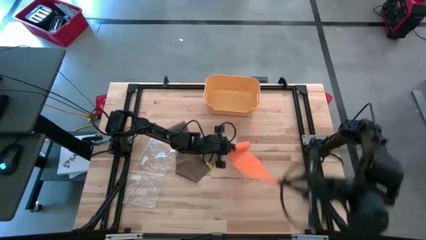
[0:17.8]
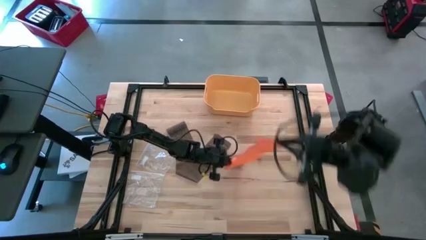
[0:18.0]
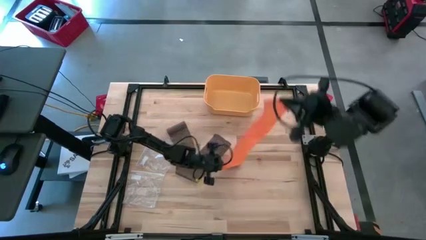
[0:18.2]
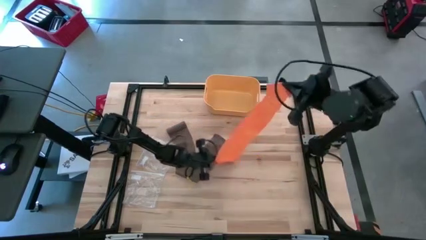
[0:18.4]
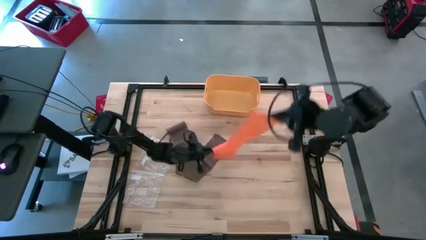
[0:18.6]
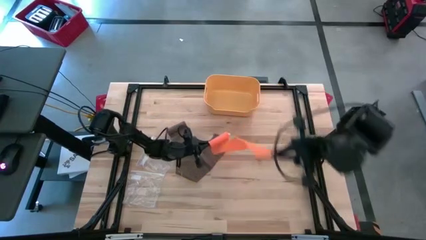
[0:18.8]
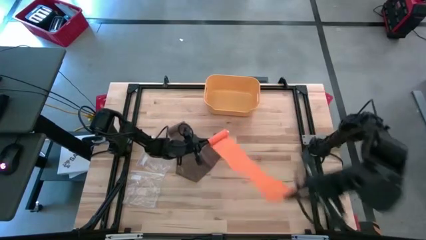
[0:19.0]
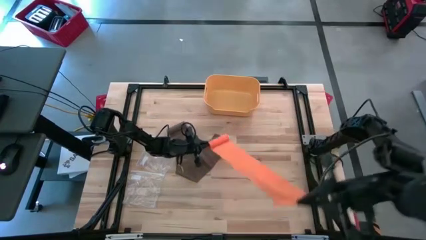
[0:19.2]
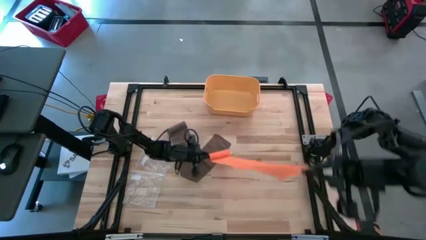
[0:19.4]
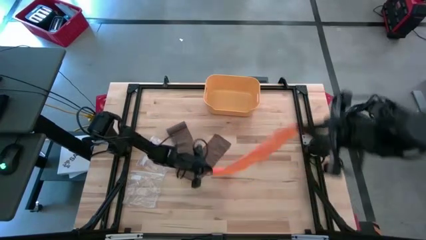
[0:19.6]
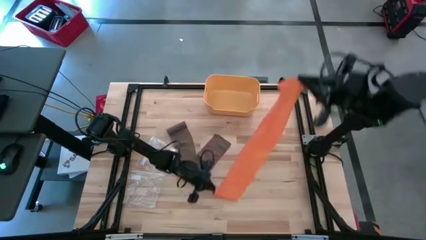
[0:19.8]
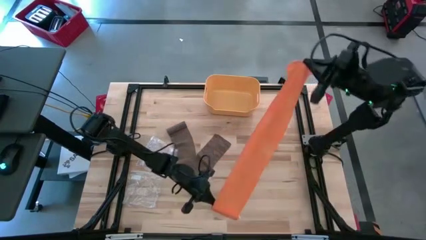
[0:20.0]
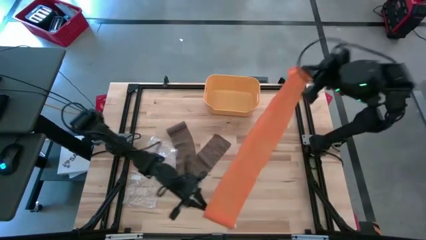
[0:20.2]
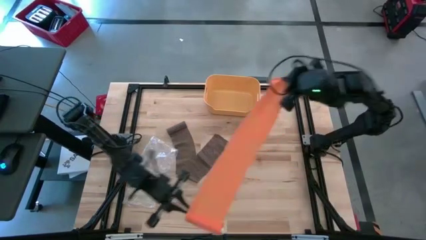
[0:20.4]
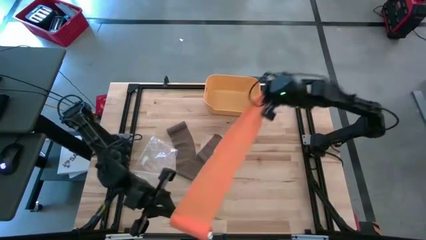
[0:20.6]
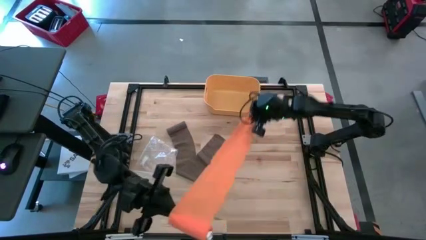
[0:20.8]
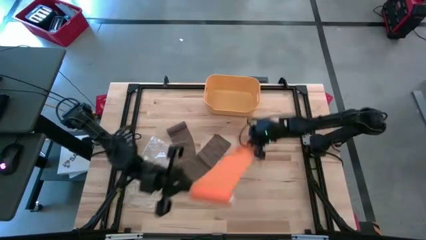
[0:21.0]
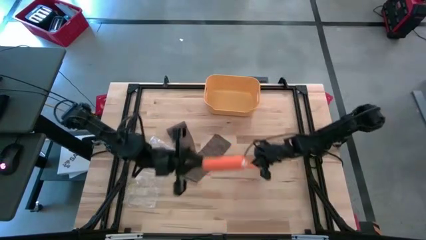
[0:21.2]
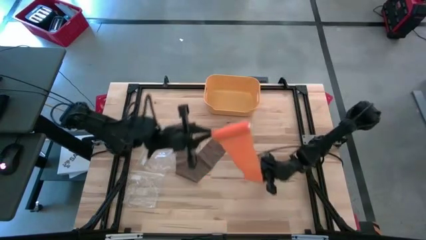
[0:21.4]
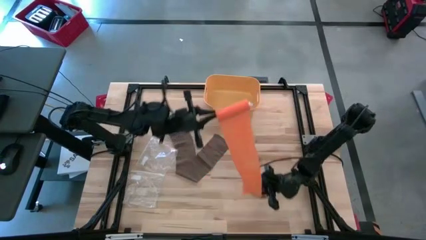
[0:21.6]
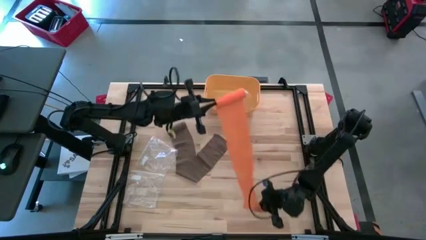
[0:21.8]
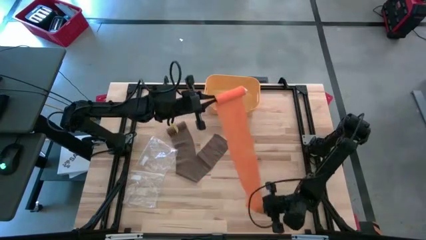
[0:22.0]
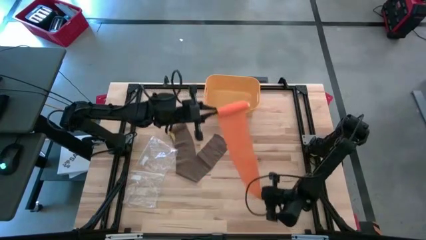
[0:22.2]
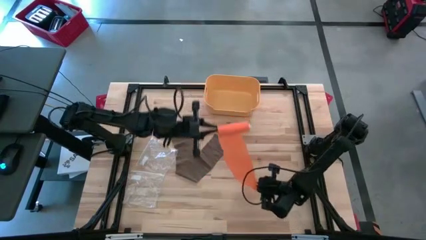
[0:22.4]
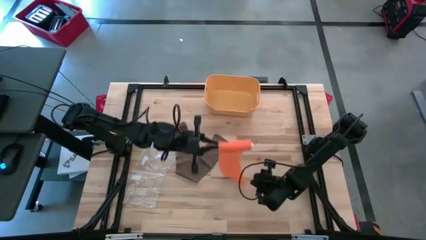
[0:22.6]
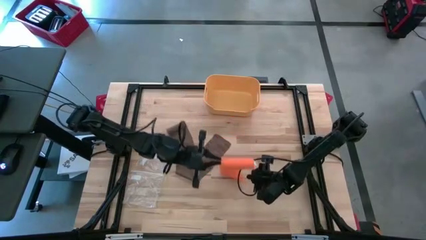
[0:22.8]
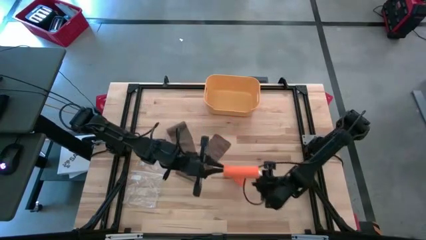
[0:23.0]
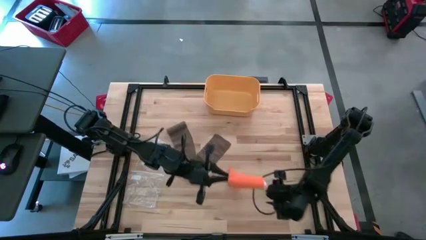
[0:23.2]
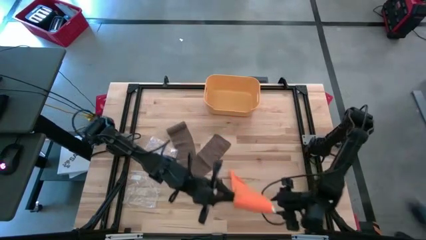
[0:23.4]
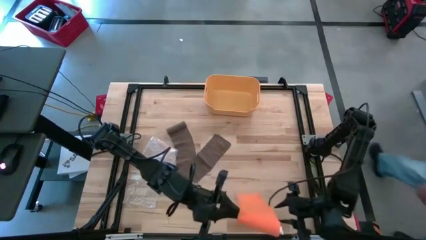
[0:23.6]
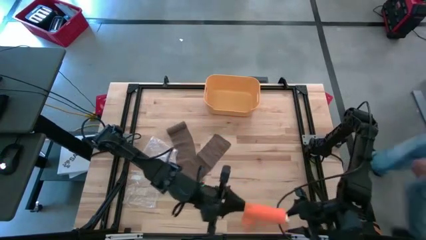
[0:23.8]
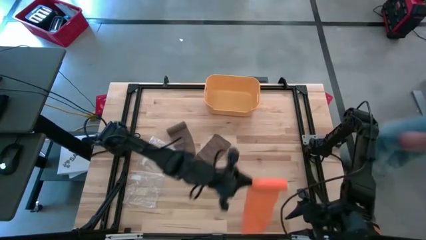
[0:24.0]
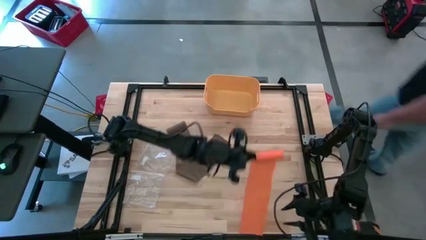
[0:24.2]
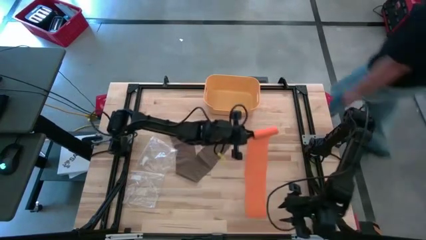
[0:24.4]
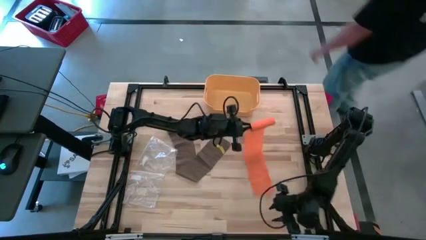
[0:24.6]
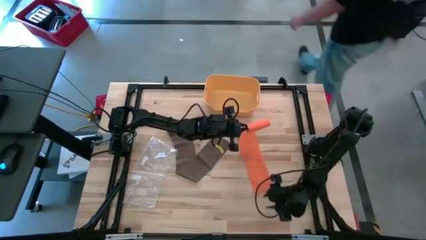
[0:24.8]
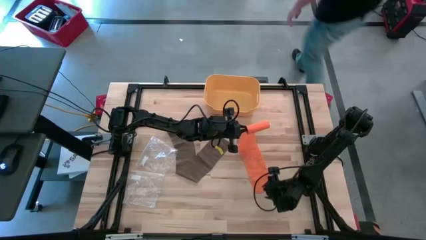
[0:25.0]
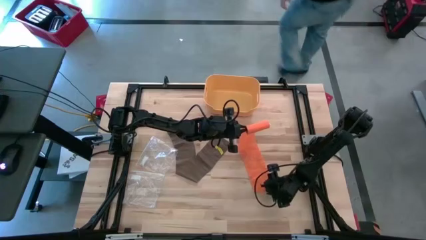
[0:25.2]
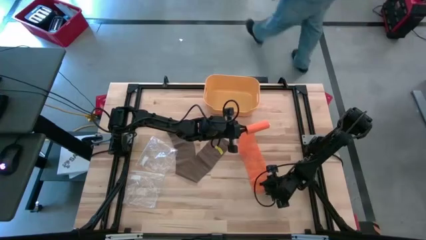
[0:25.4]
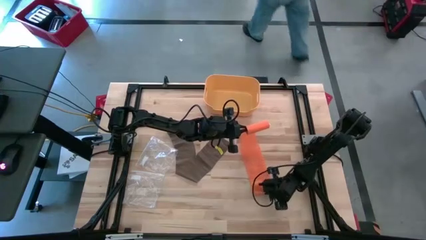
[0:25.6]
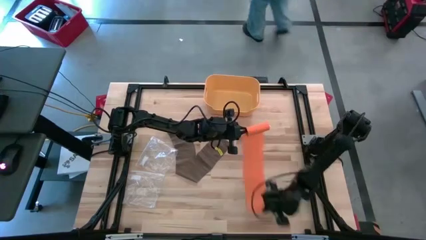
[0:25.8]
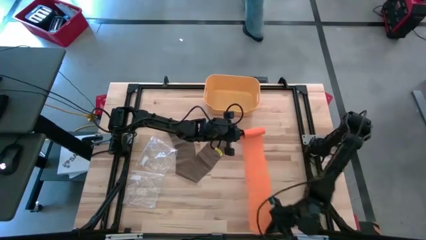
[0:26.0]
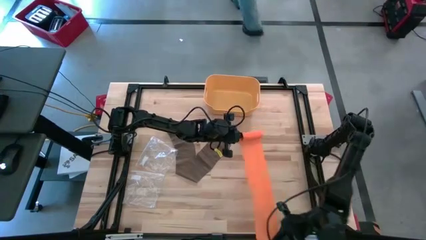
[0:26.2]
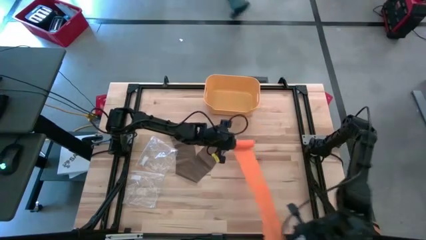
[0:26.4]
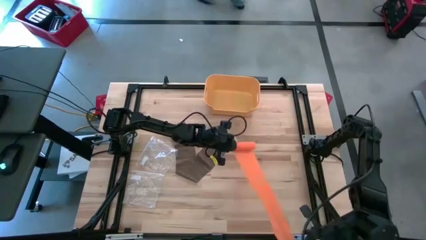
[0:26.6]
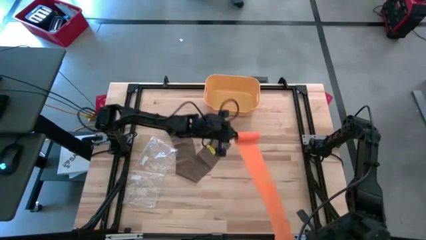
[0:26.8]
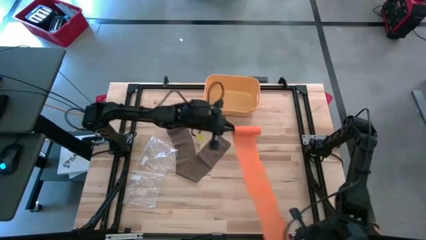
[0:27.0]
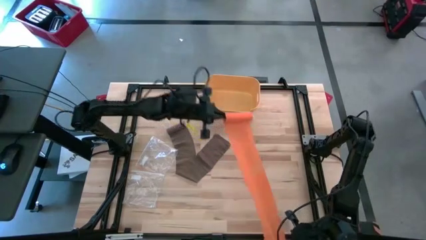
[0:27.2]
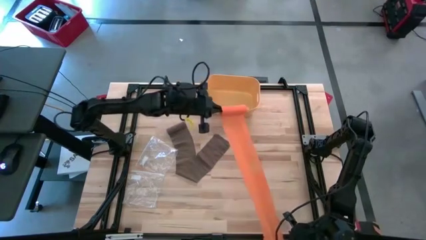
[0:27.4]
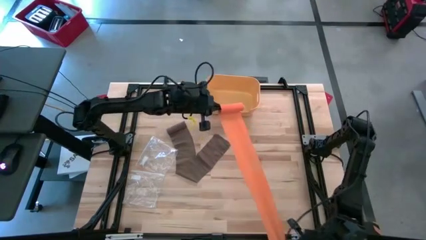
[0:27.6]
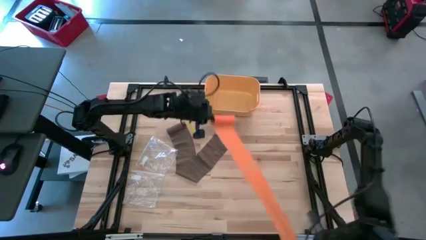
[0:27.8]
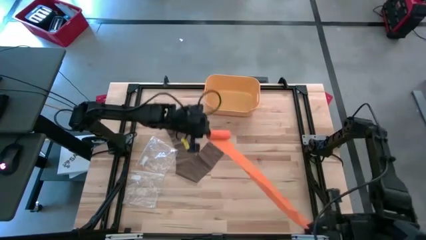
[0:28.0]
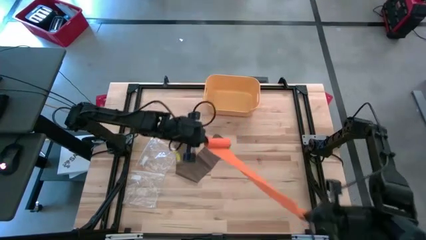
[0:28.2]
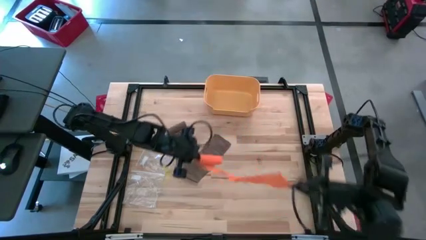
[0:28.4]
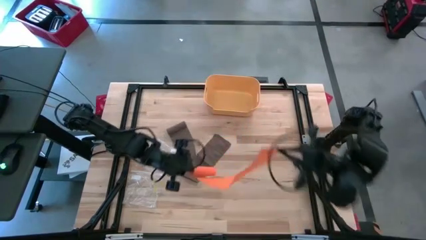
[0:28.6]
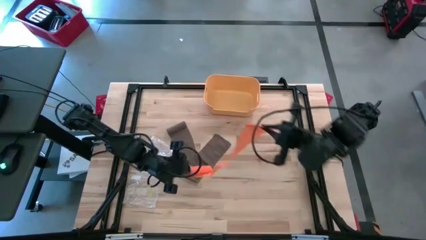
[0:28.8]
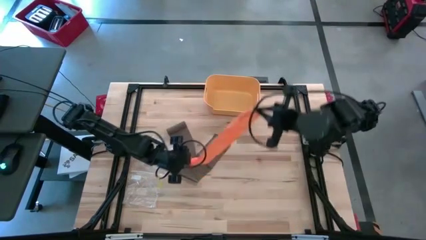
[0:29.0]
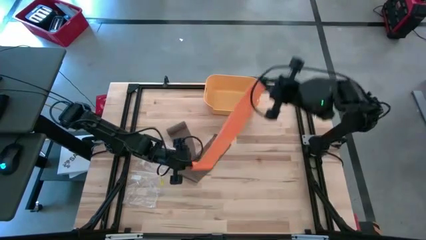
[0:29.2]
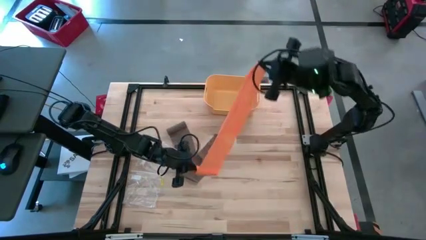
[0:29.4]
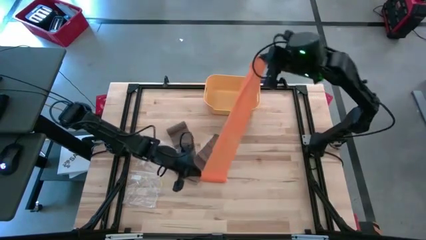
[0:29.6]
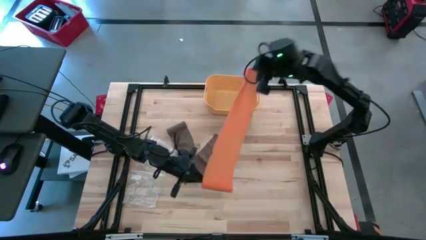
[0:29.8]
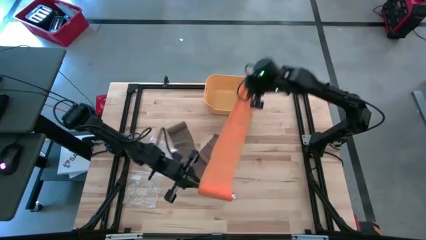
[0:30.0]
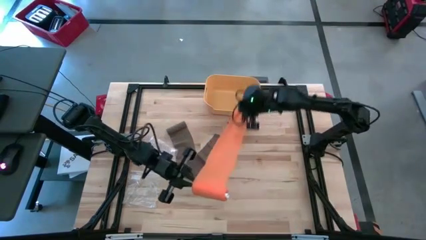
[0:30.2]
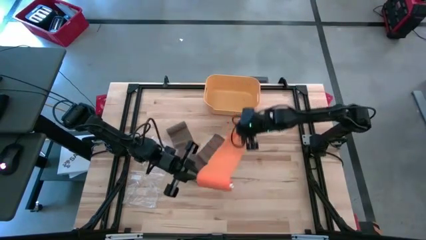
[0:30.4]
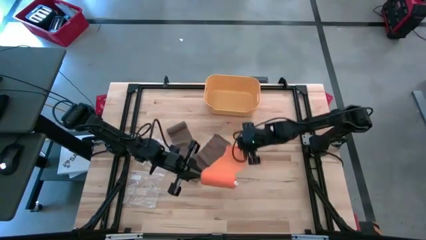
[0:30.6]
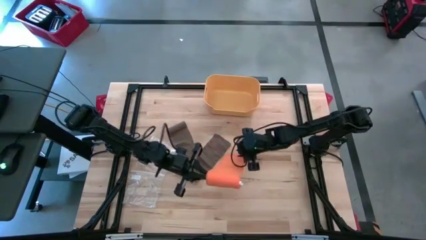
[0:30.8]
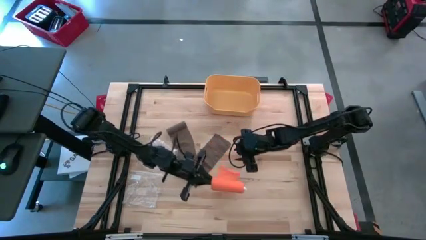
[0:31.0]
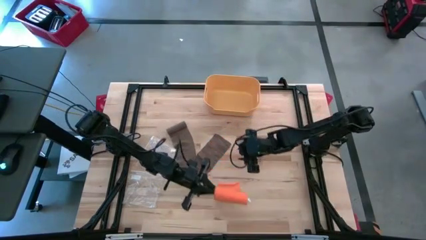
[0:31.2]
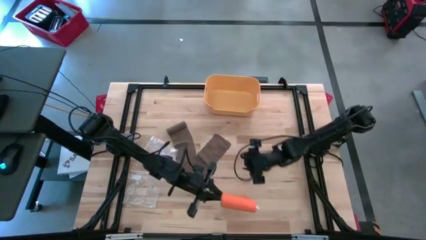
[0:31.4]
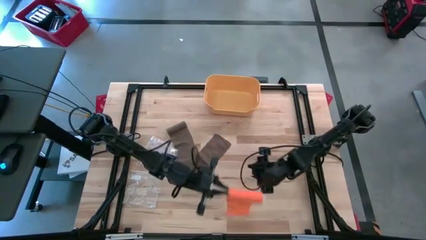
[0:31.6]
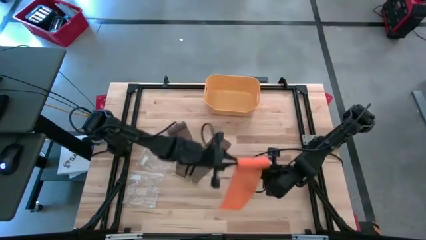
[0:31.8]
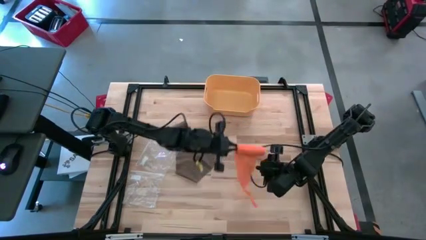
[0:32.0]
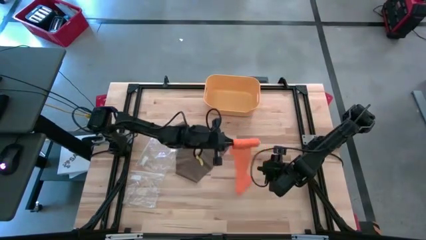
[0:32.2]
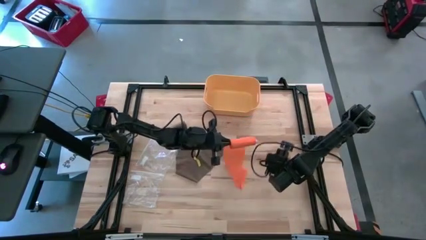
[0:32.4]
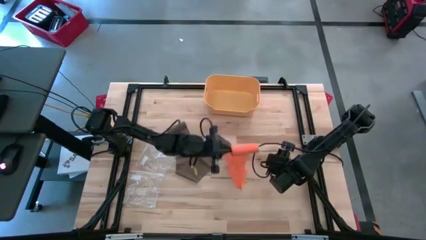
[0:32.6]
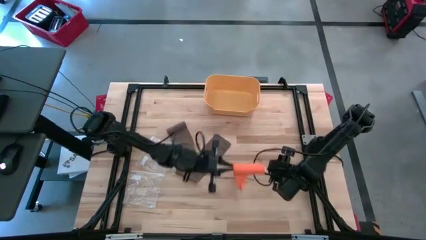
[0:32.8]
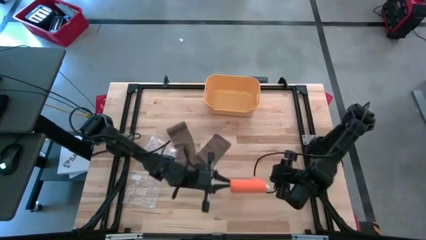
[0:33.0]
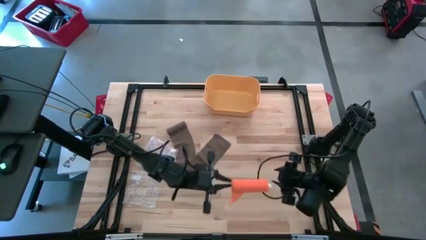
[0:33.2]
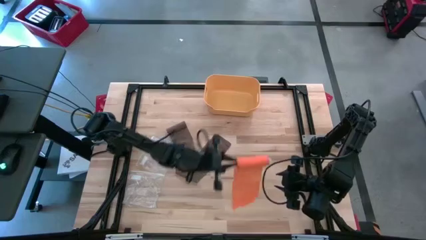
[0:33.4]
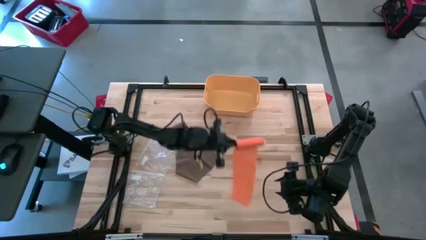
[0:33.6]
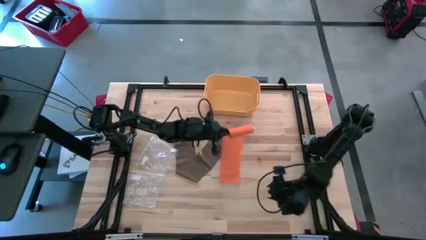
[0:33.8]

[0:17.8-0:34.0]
Task: Roll bandage
Roll the orange bandage
